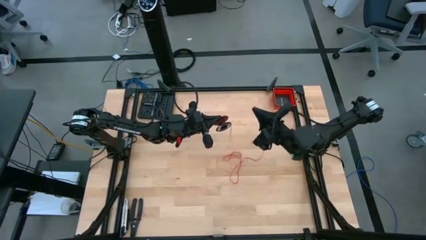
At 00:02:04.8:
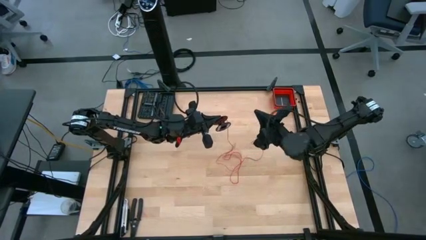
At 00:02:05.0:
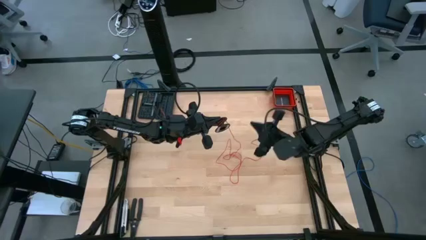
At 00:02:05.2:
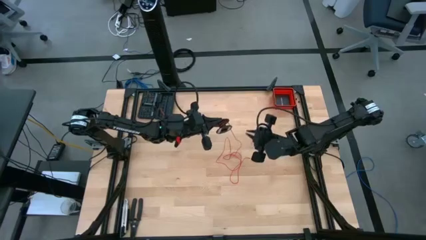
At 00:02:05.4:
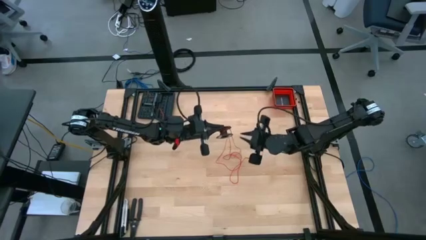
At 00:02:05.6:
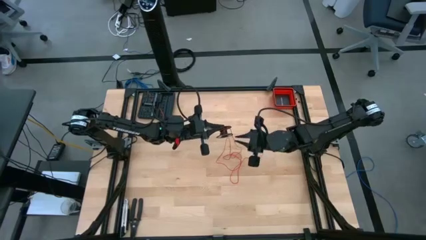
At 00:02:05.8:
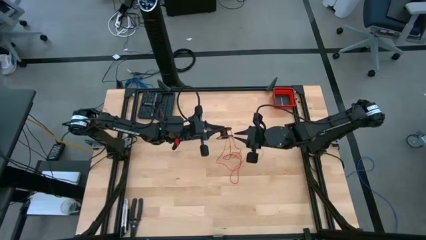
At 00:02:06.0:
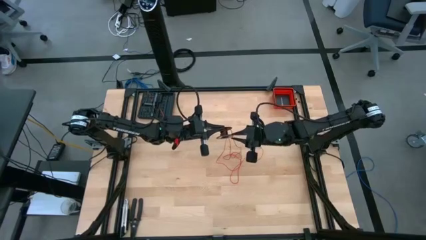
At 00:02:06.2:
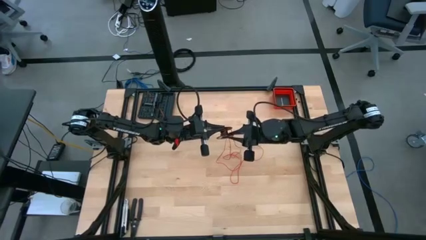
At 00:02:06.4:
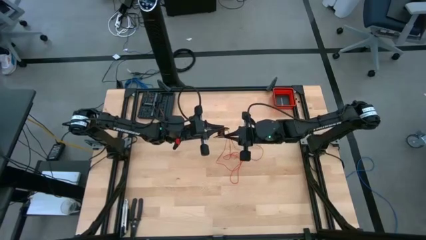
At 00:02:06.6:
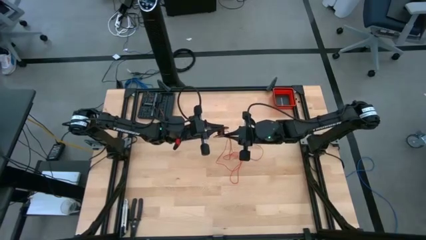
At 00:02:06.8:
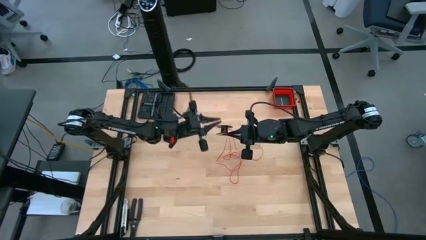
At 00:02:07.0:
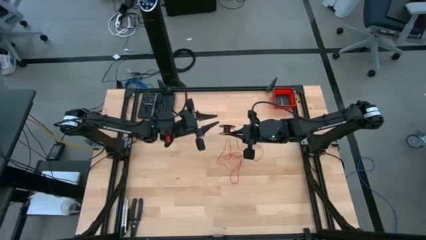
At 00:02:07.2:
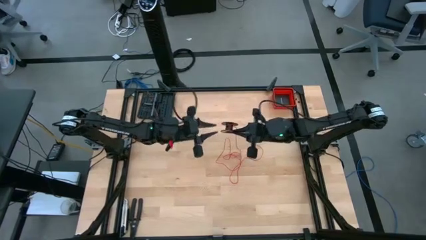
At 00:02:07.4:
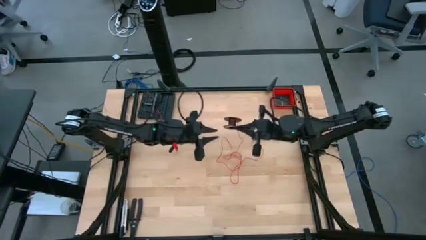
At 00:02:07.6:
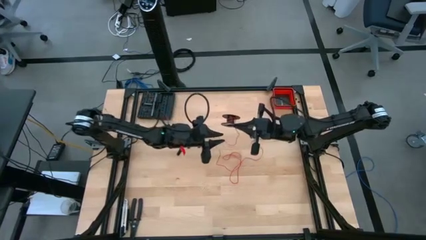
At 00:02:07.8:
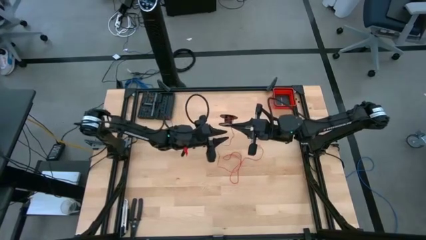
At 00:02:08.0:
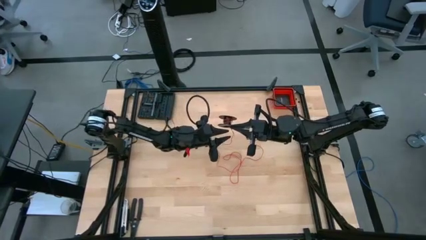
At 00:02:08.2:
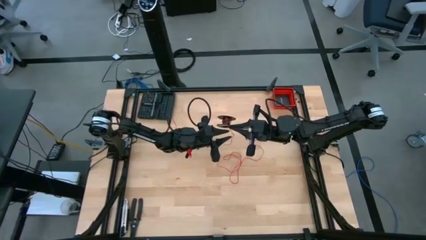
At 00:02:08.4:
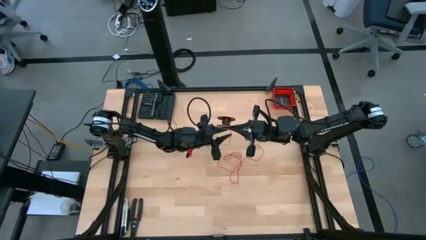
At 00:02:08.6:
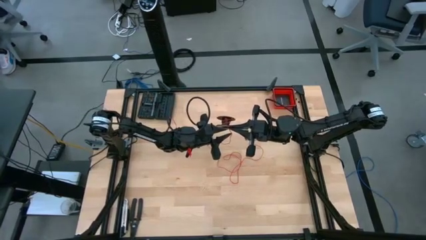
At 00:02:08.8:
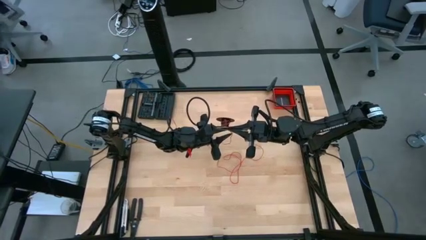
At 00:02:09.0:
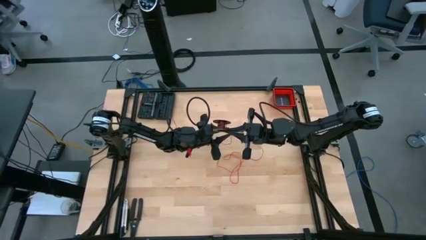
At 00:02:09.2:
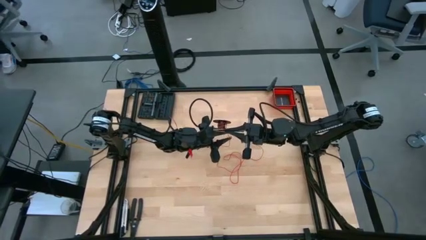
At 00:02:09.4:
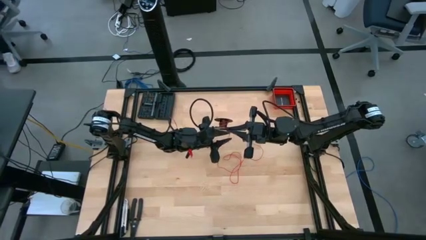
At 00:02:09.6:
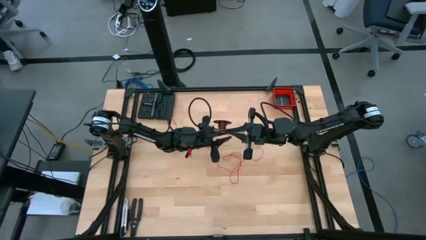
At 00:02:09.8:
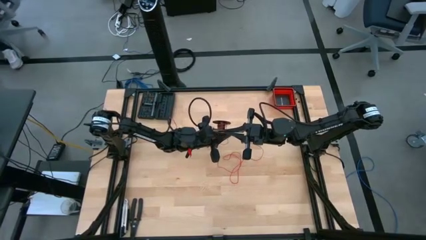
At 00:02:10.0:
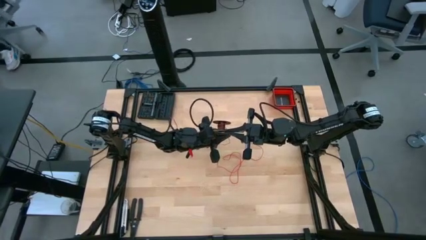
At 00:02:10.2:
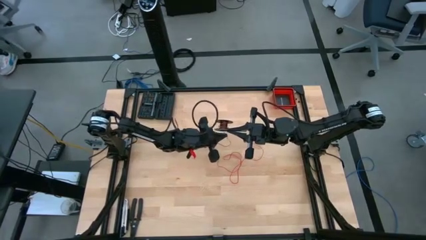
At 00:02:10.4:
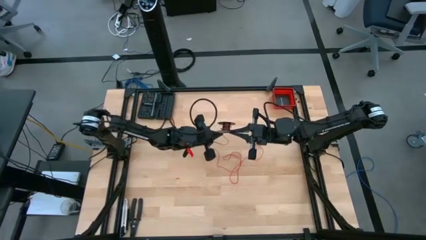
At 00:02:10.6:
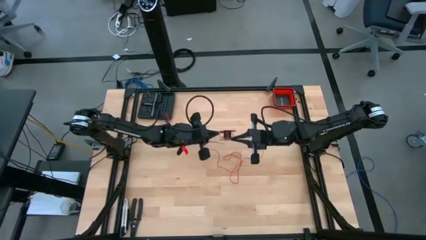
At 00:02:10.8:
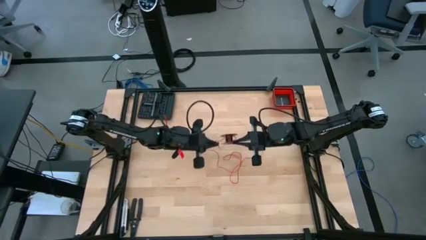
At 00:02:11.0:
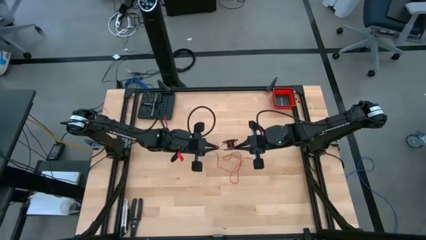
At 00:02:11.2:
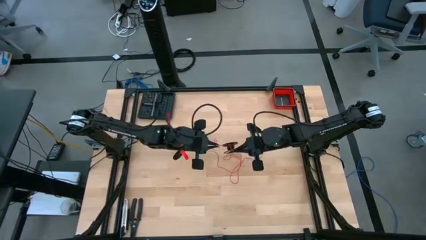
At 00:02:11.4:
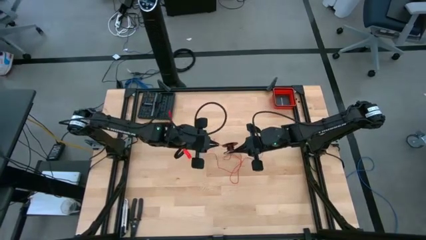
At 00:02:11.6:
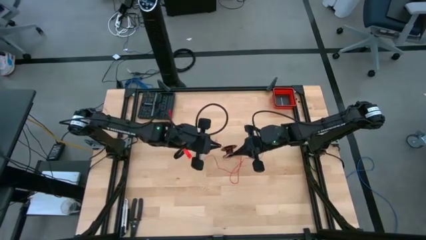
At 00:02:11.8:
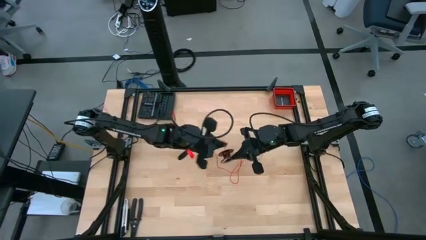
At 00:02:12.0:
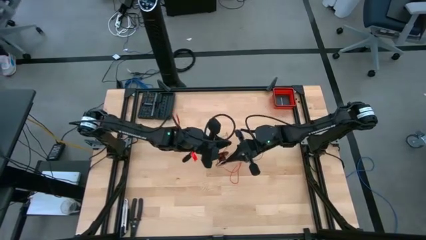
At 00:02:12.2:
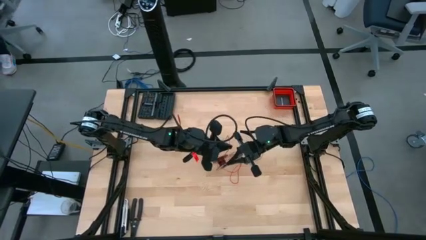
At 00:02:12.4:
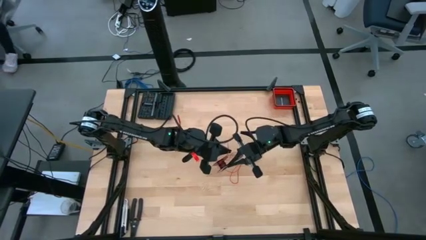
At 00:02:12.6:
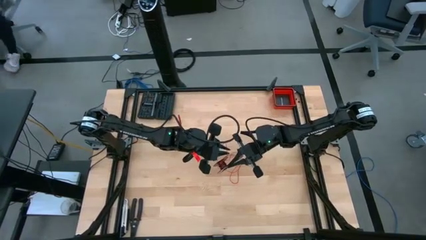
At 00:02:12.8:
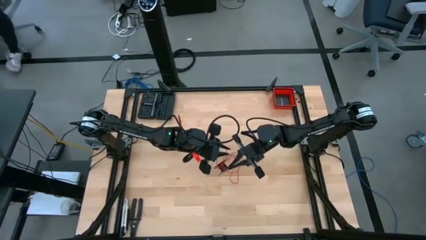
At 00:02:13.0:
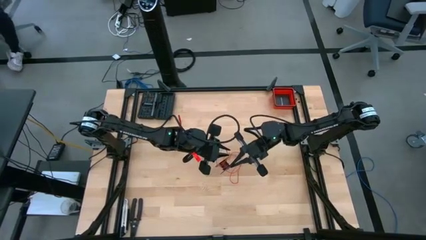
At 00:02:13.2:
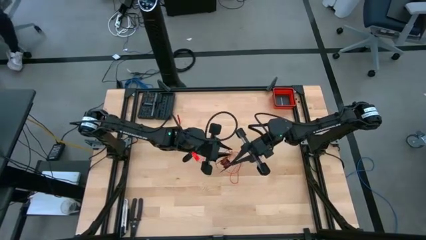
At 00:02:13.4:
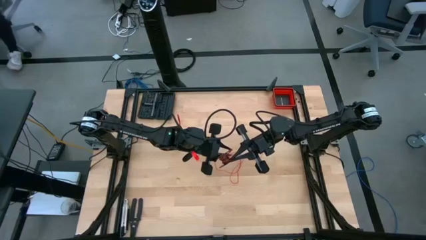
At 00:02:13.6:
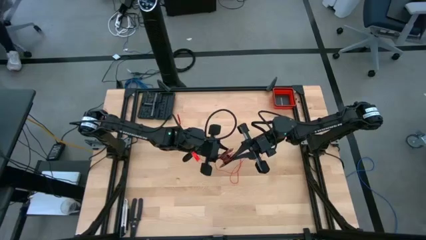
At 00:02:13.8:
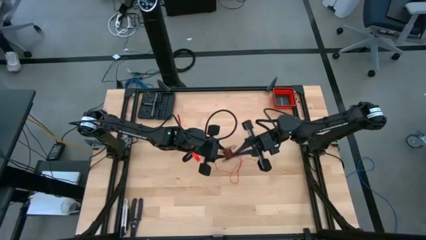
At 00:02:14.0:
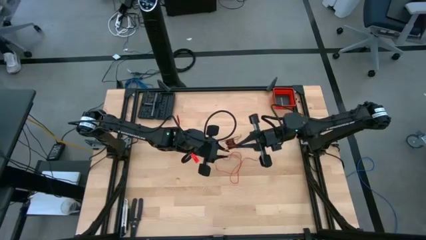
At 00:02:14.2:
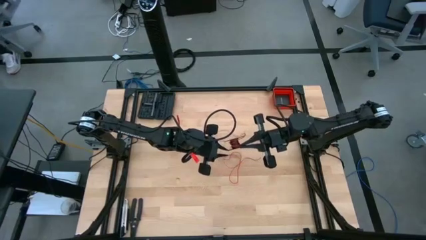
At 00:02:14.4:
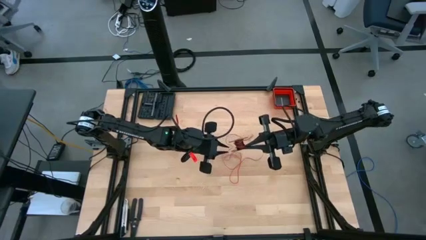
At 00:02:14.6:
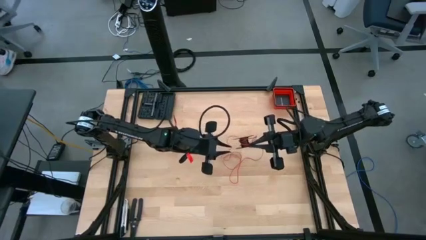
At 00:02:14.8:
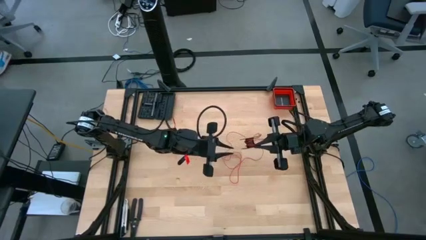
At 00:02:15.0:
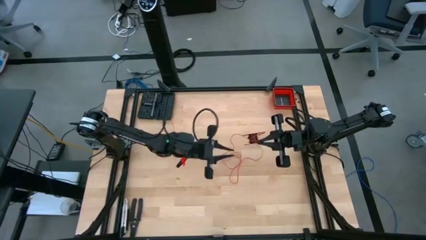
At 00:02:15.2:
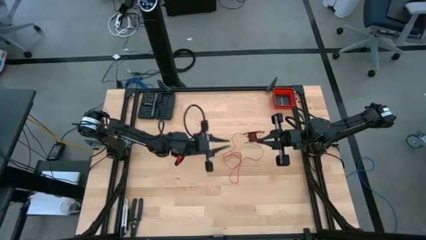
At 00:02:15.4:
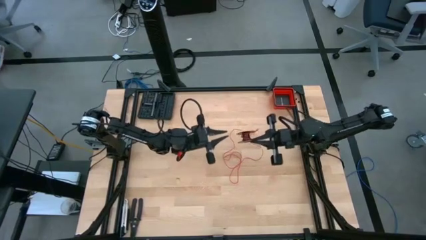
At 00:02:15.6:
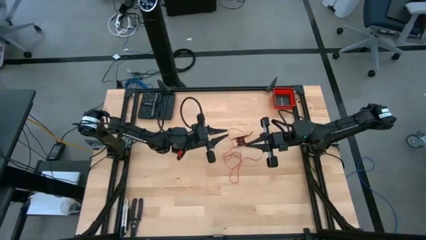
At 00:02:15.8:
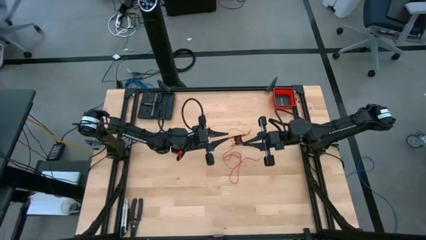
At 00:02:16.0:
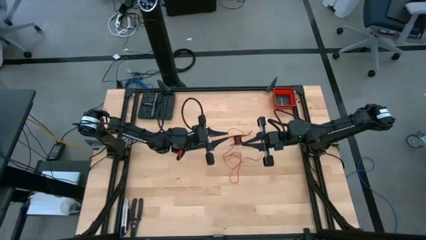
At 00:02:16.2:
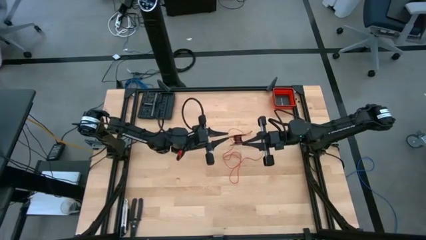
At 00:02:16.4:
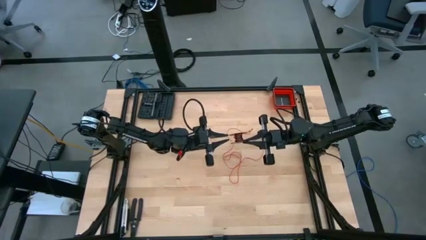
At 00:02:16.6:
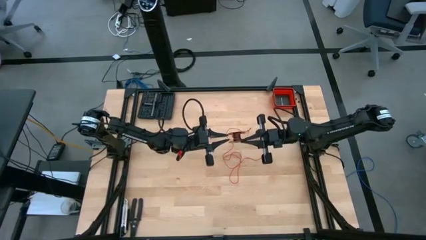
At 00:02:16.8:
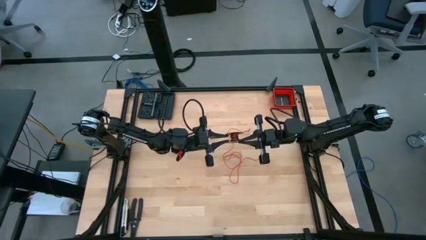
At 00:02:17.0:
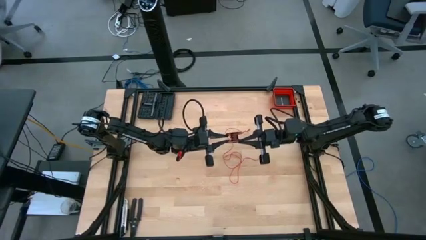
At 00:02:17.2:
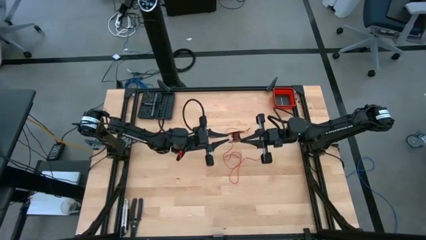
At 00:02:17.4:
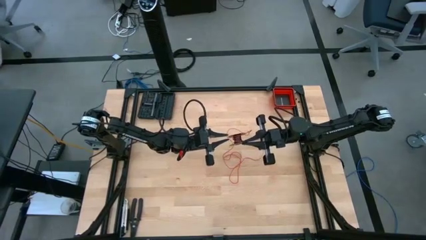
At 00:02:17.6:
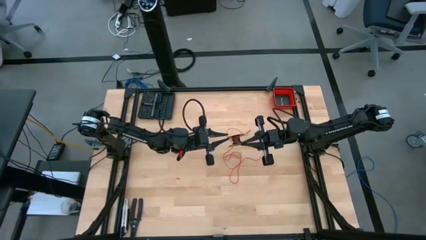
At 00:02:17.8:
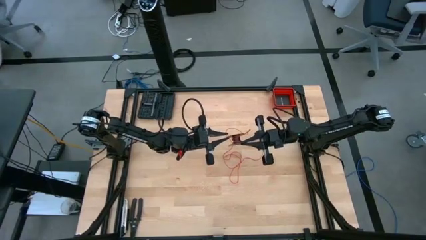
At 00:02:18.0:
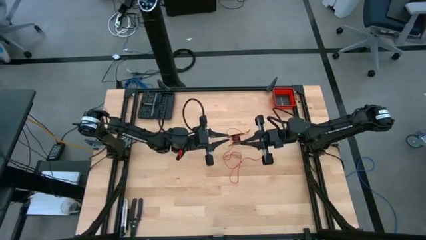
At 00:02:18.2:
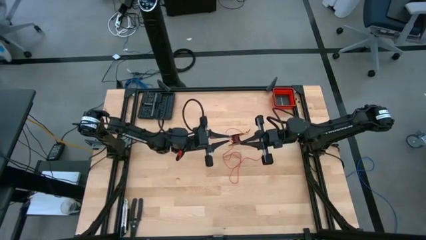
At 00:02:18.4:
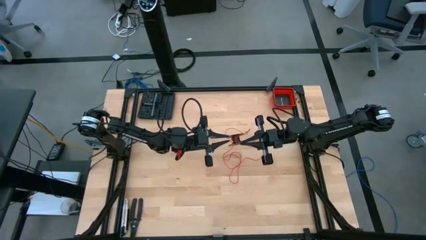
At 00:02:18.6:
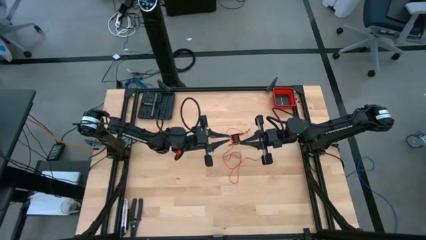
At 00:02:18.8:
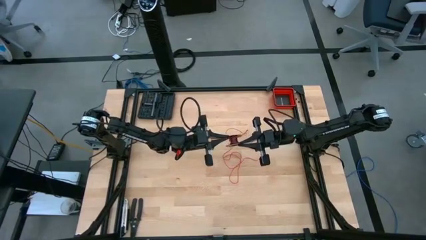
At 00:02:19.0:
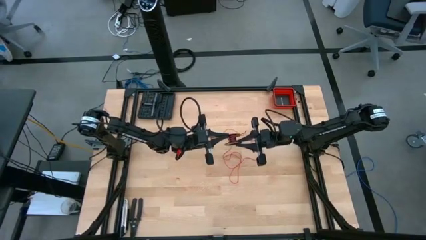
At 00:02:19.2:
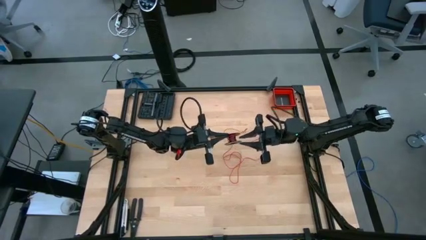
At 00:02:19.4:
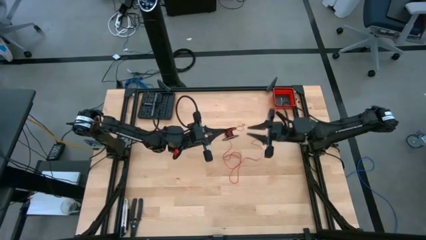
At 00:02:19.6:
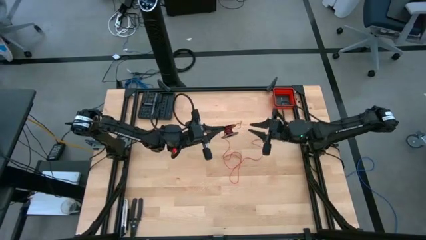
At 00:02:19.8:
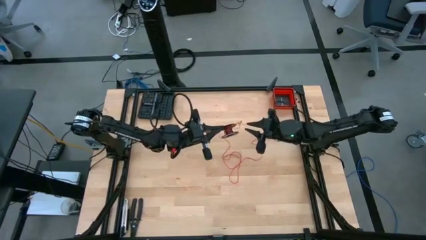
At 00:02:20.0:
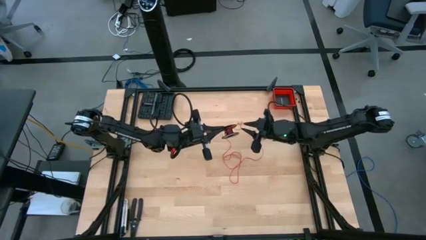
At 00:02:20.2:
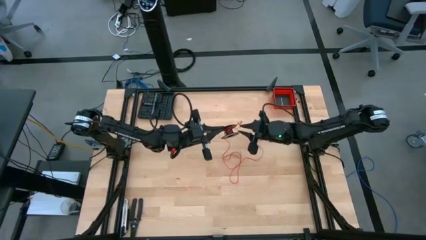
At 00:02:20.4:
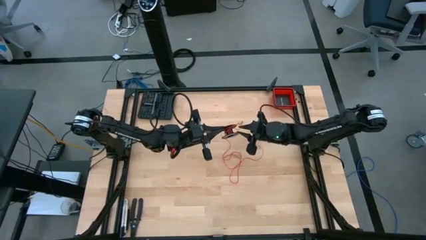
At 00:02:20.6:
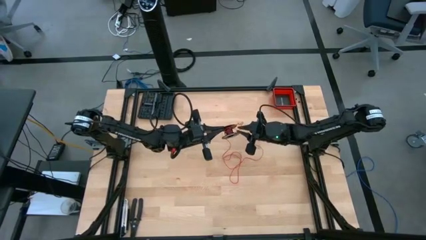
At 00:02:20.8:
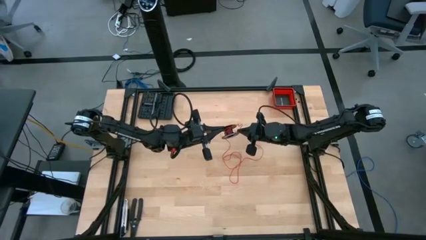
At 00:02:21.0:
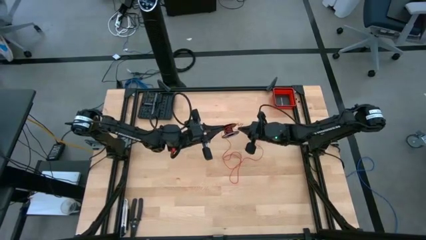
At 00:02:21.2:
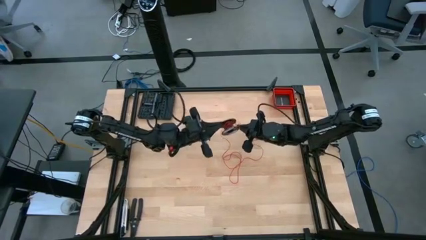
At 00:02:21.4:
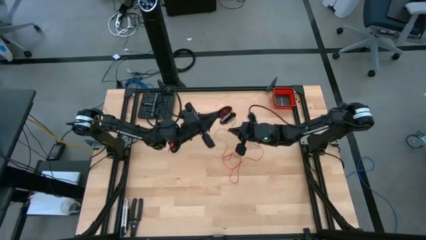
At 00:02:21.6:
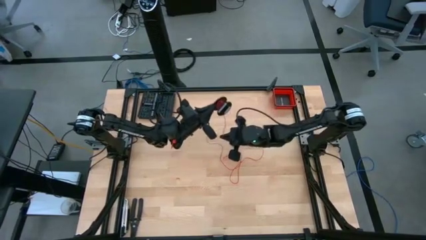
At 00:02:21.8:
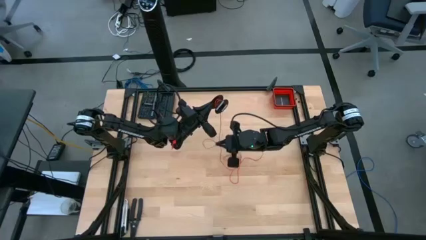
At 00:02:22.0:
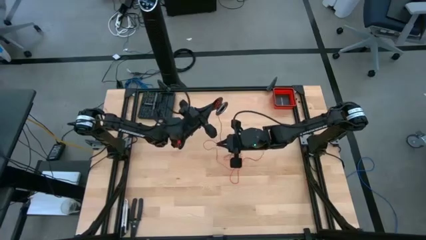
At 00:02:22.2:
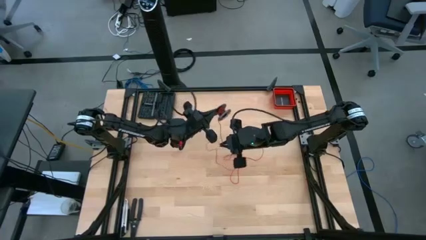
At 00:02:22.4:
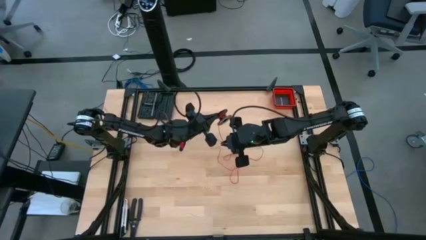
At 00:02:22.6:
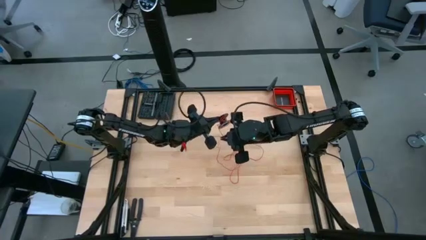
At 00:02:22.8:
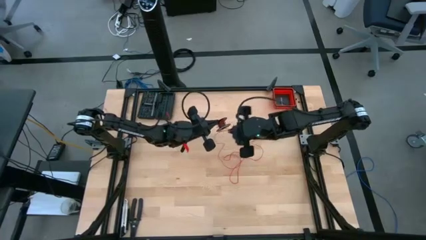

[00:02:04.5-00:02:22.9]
Task: Coil cords
Coil the red wire on the black spool
